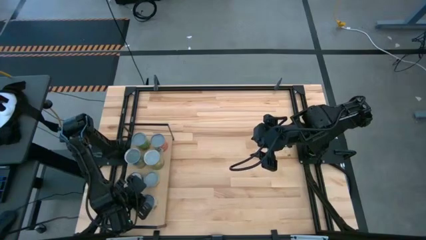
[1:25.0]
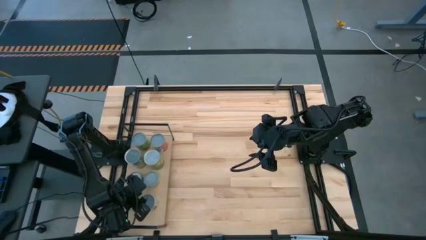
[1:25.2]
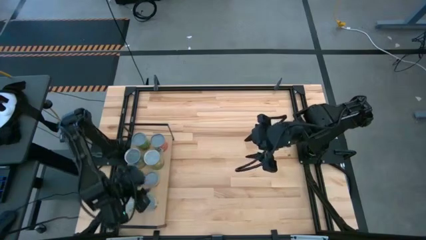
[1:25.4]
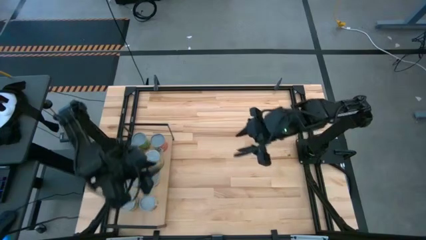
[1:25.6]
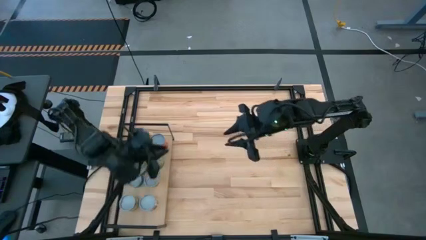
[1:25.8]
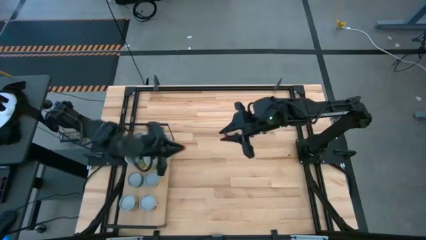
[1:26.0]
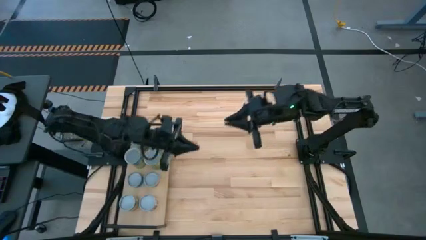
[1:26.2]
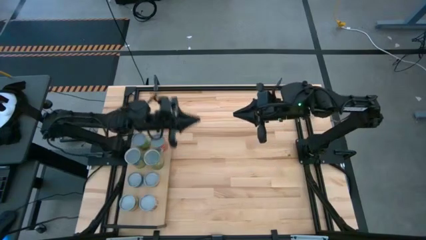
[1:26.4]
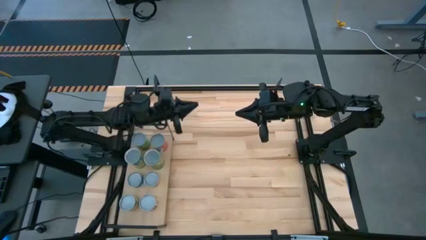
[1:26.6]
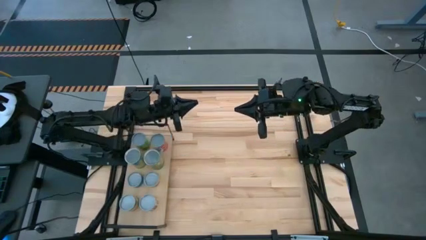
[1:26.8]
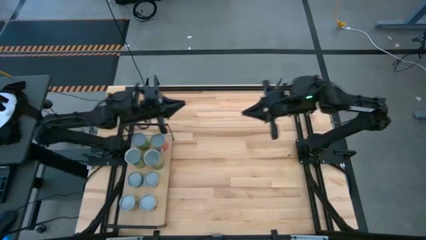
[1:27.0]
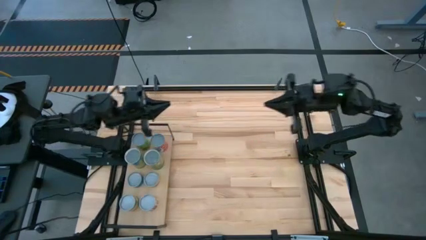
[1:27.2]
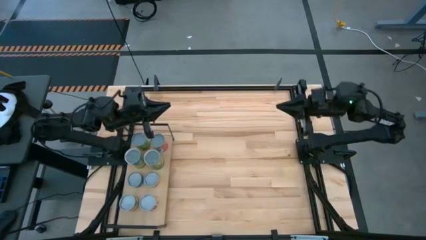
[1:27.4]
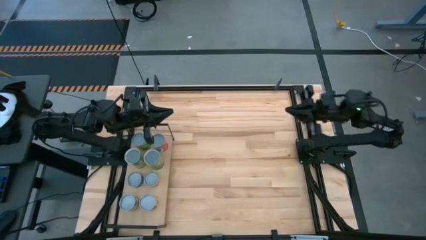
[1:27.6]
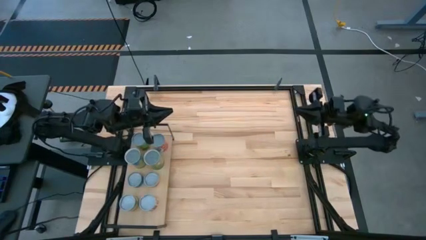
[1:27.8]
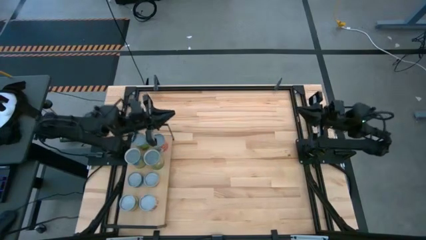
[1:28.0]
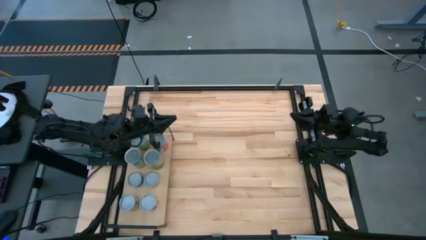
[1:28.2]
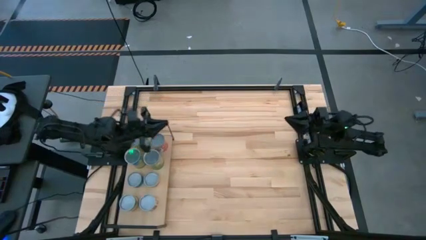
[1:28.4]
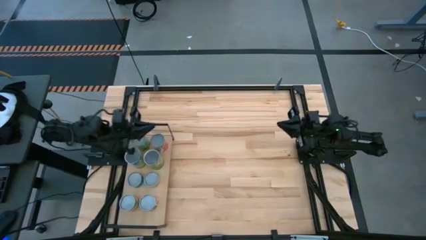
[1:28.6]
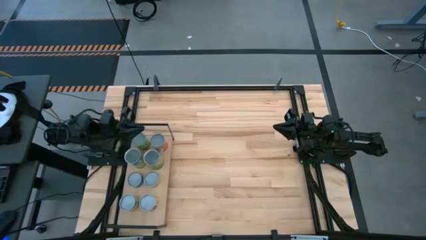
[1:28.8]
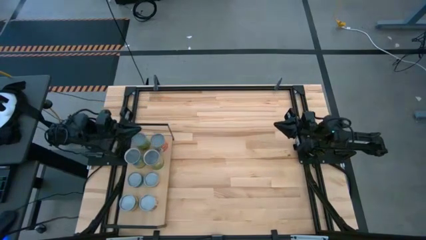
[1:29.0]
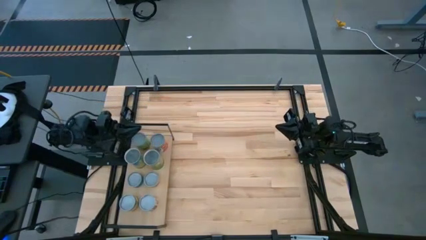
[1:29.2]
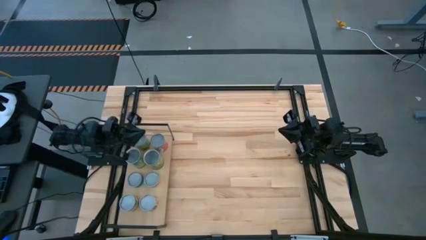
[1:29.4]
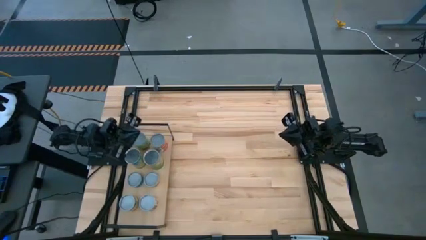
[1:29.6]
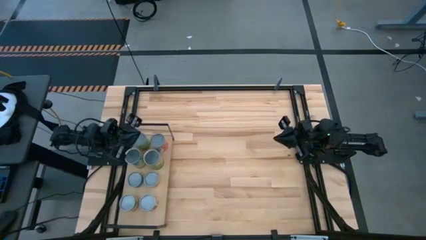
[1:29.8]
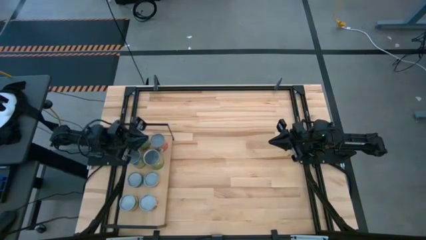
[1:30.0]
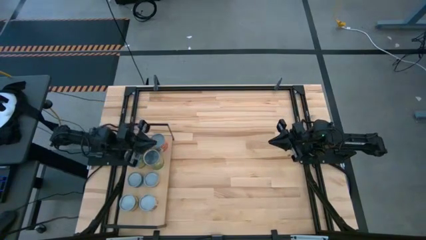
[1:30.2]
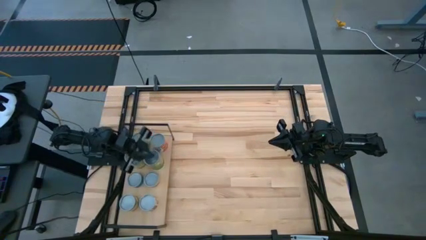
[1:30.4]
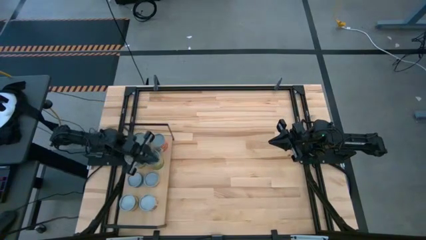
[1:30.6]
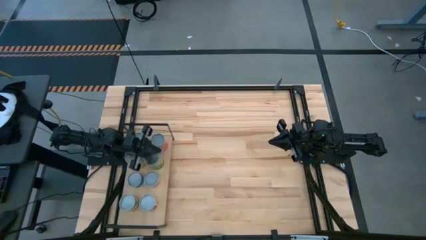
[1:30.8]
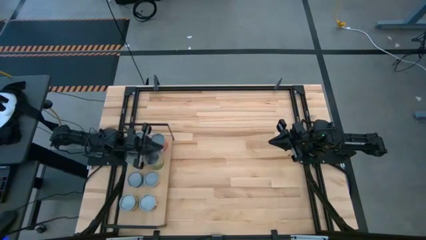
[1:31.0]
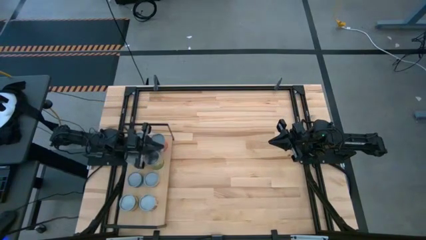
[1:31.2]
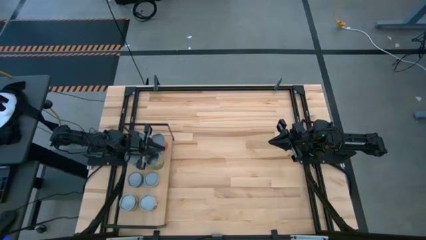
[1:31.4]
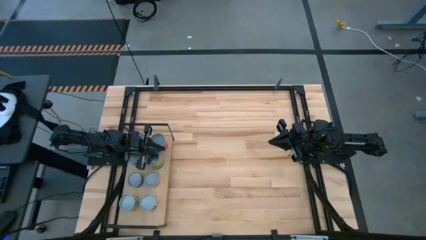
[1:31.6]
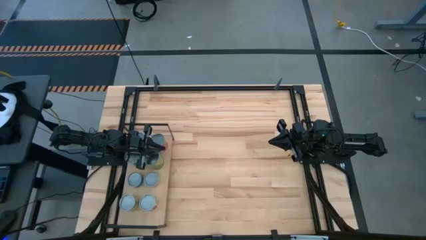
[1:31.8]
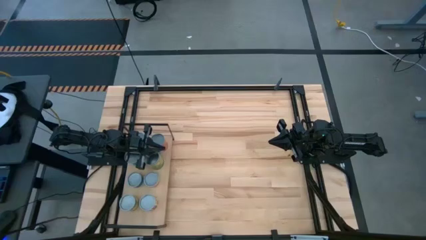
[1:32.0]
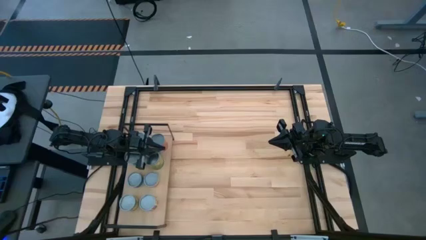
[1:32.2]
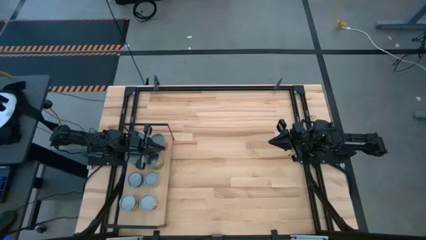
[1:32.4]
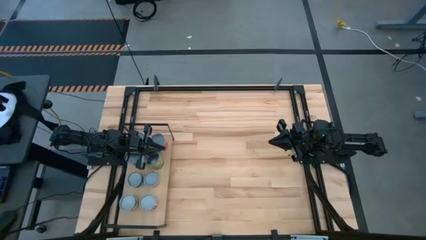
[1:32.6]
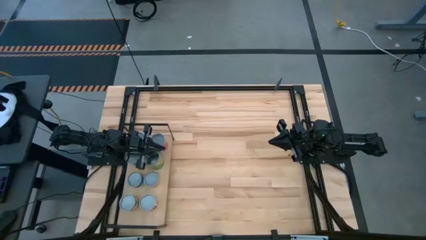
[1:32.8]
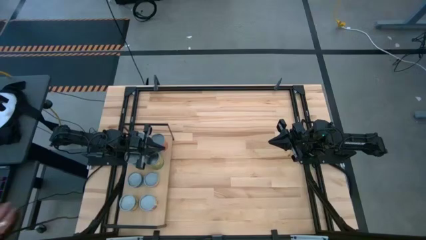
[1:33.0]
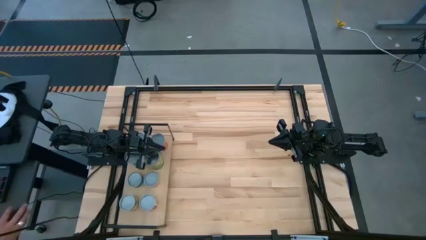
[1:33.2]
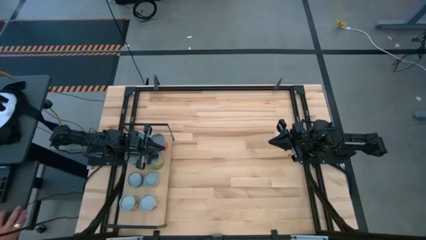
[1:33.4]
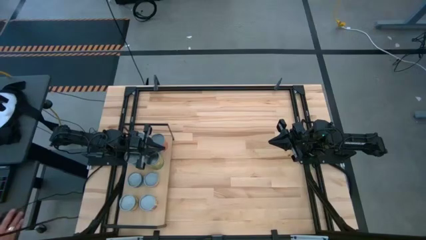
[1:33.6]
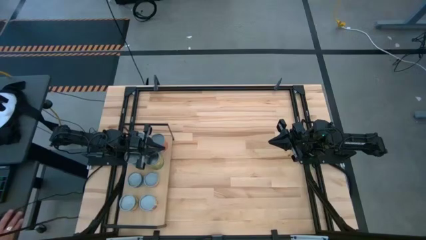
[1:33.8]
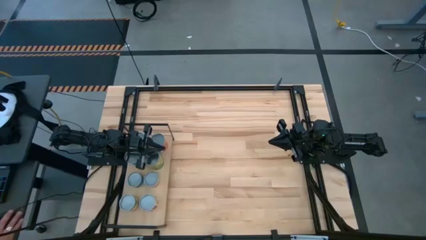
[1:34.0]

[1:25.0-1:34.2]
Task: Pick and place cans onto a shelf
Return to Home Position

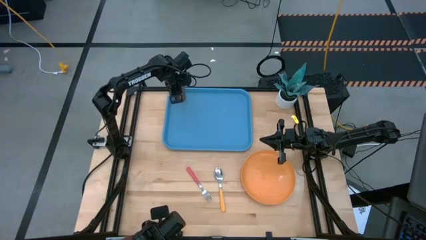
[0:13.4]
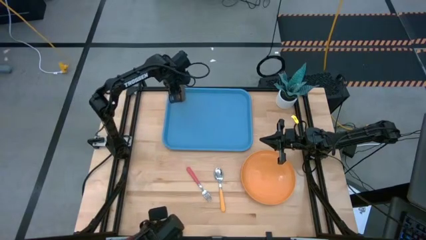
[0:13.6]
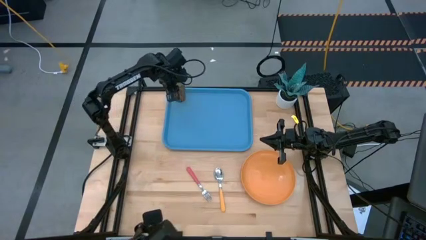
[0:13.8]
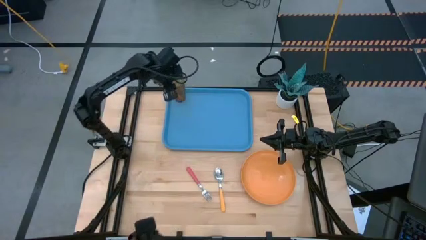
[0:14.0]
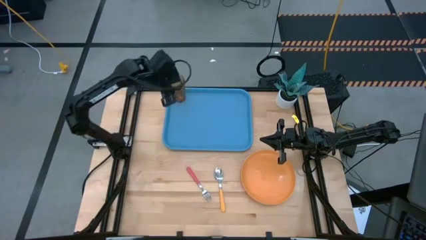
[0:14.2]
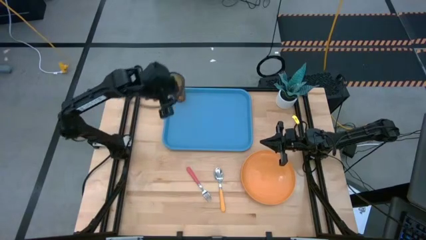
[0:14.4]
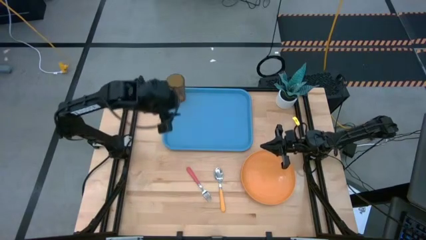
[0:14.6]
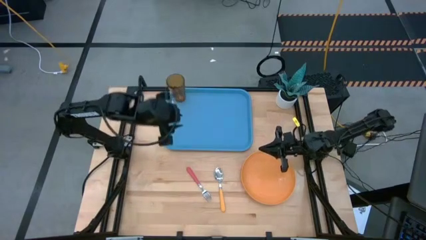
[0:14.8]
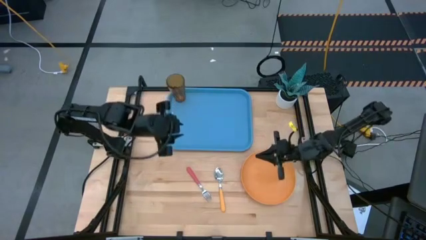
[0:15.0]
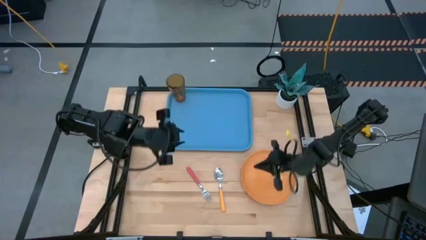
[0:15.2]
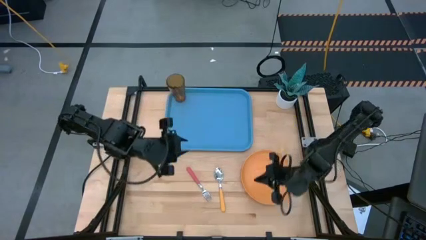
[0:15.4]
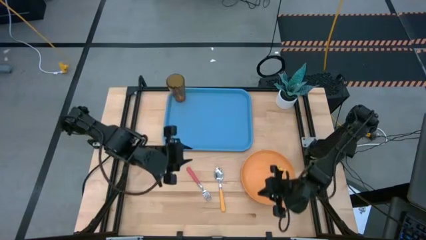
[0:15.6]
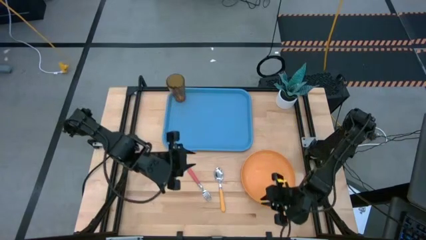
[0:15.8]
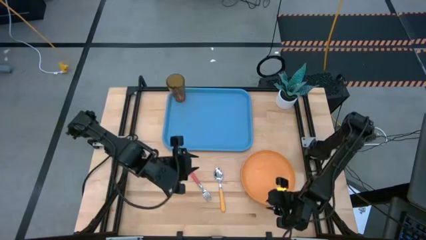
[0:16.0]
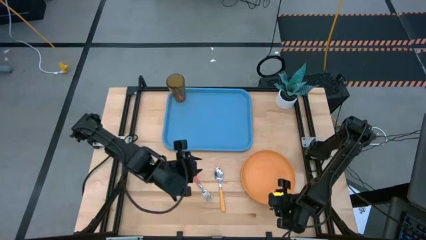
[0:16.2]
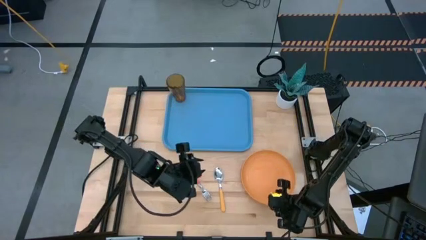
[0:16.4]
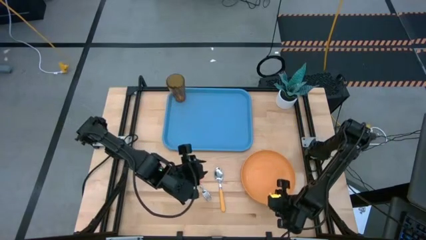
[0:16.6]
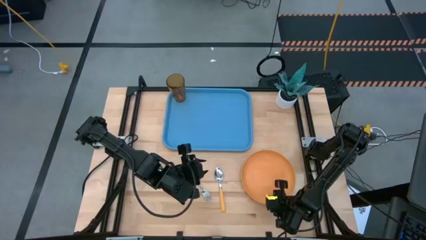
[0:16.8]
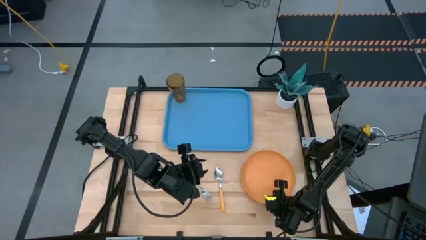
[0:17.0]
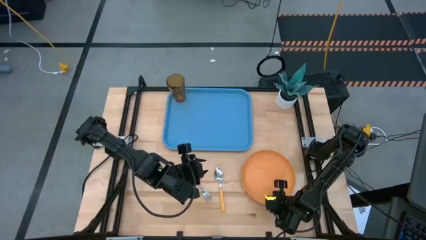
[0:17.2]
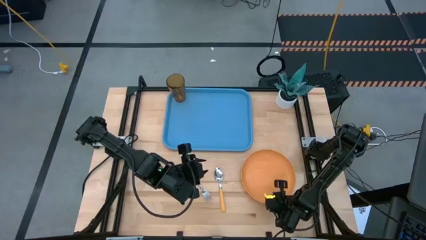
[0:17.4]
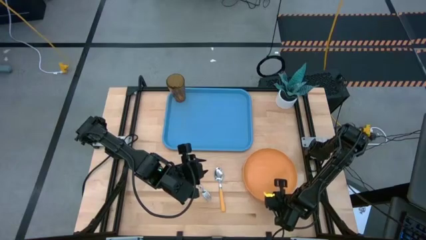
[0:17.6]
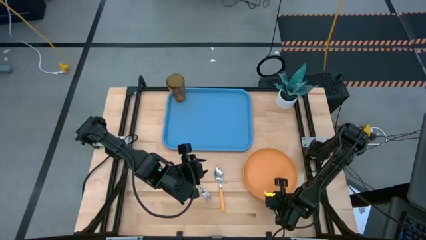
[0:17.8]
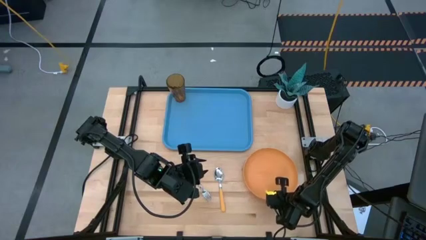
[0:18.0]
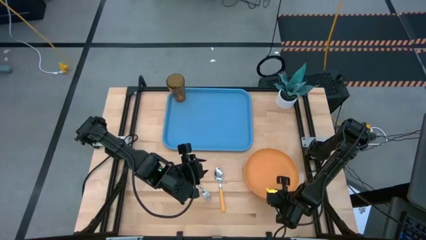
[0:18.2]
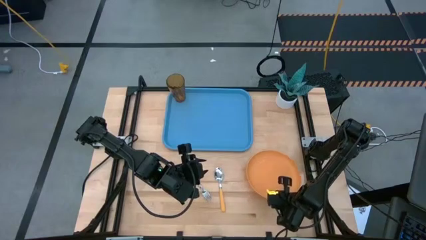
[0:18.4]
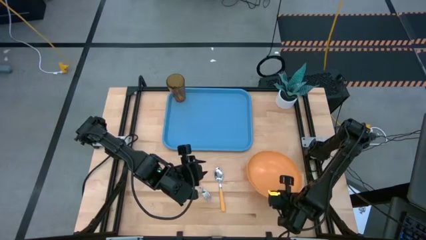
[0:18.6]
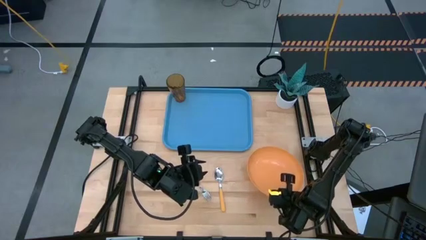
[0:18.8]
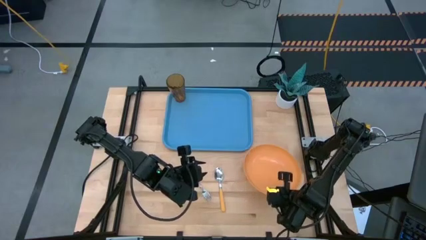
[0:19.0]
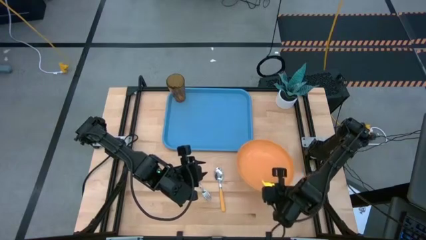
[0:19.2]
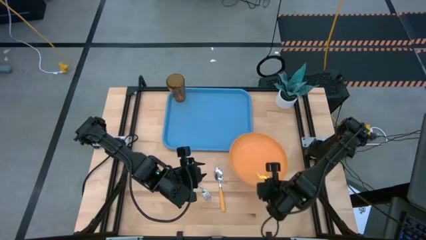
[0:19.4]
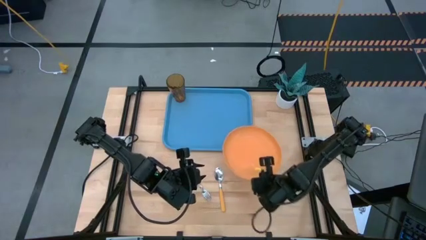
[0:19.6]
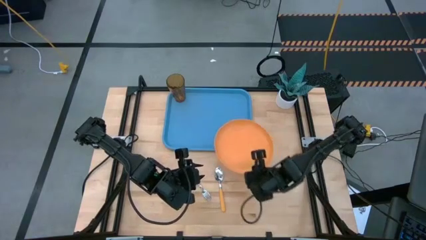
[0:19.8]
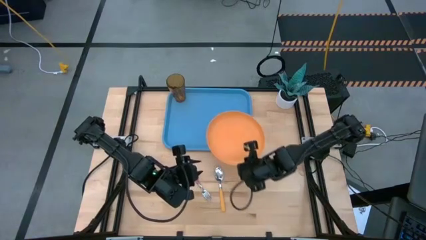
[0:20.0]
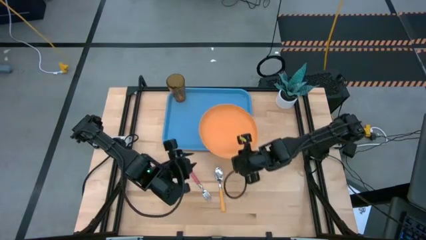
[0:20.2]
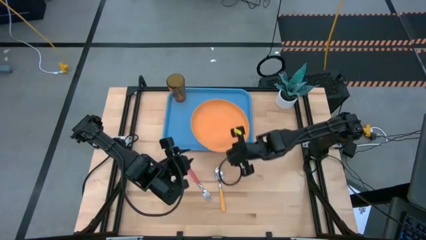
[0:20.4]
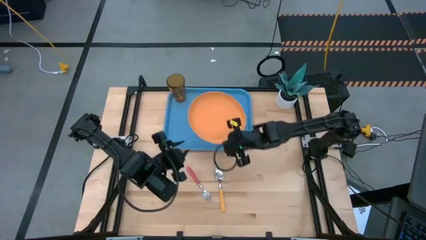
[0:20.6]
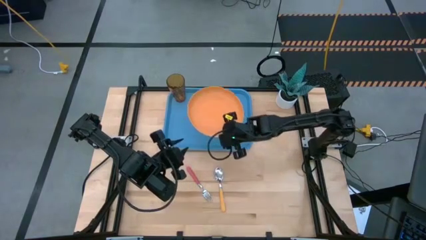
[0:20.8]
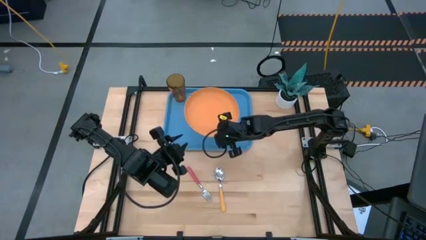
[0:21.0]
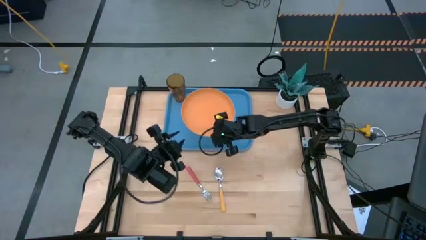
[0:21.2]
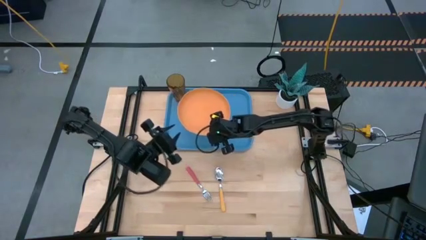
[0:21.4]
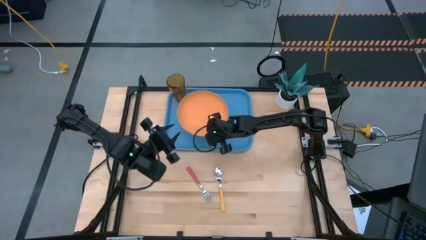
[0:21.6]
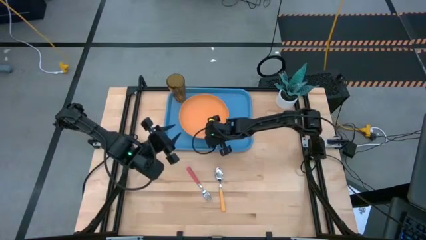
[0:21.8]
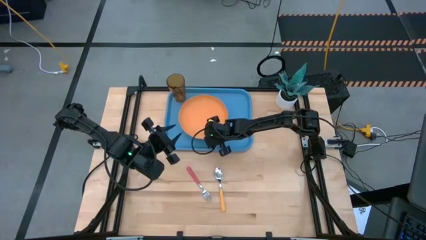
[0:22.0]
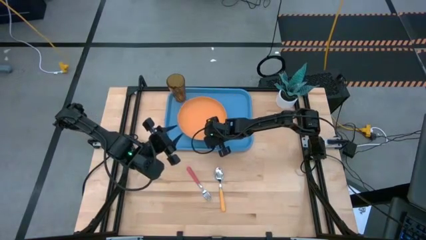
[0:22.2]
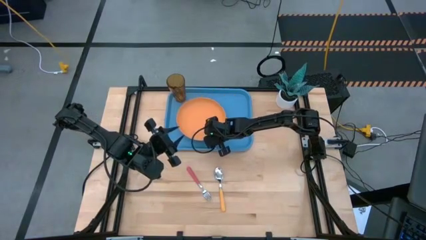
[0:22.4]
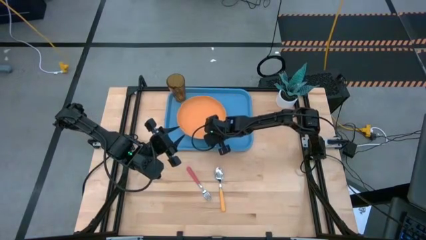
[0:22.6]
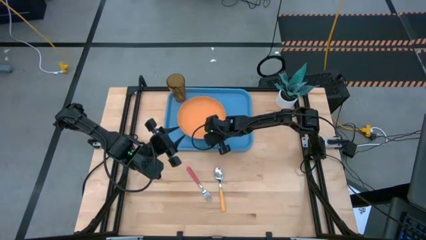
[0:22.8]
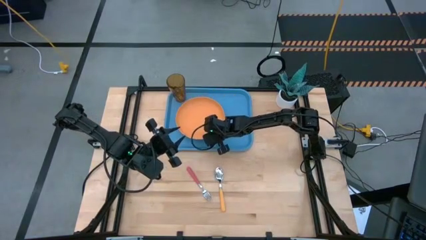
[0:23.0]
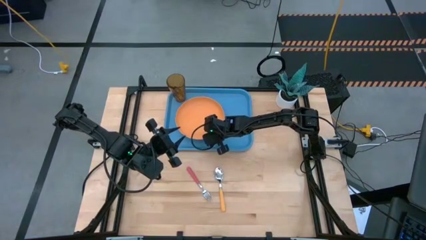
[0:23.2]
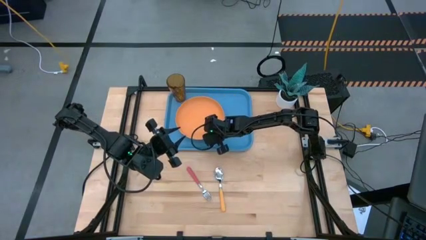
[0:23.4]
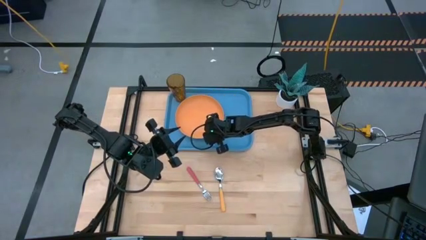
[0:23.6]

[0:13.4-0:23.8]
Task: Pick and place plate/cup/fork/spoon on tray
Put the orange plate on the bottom right of the yellow cup
